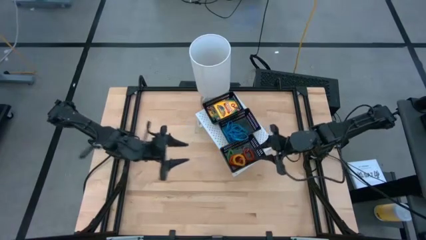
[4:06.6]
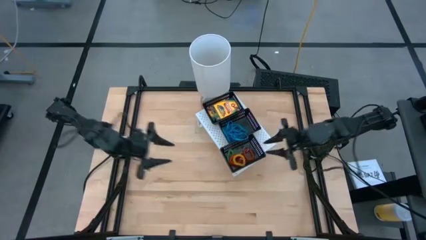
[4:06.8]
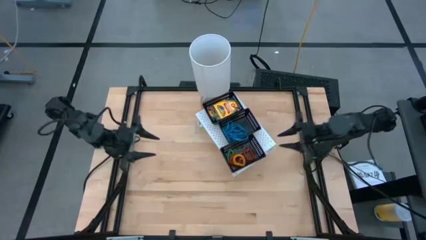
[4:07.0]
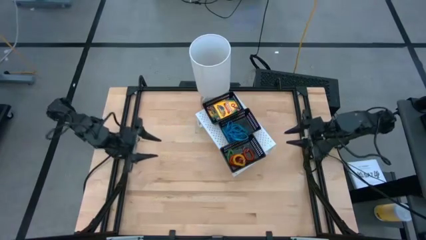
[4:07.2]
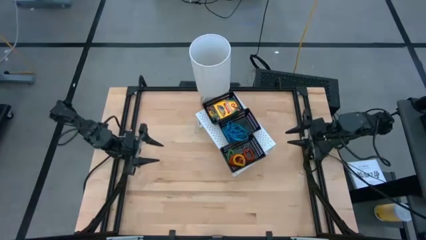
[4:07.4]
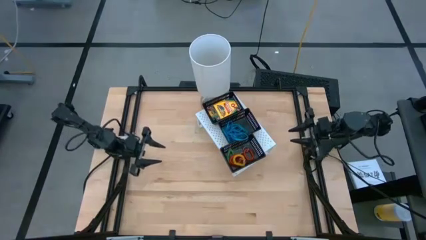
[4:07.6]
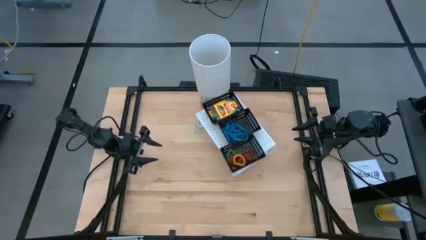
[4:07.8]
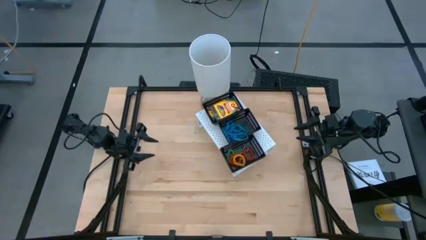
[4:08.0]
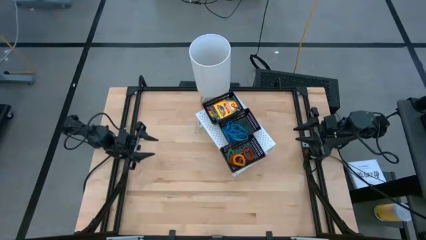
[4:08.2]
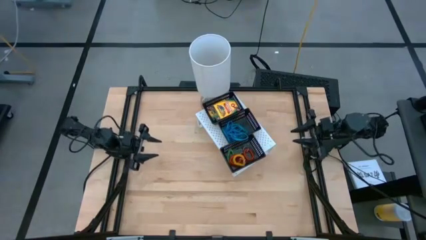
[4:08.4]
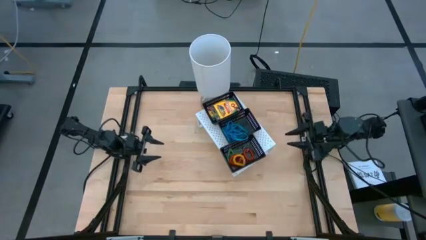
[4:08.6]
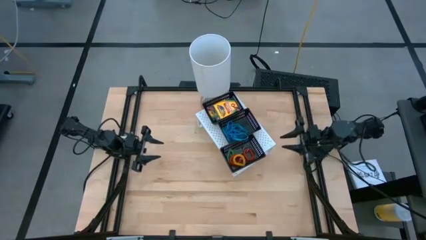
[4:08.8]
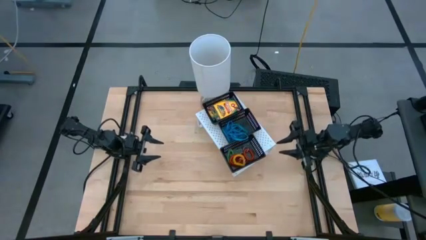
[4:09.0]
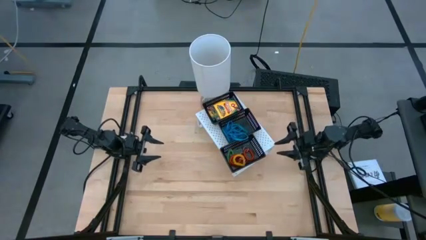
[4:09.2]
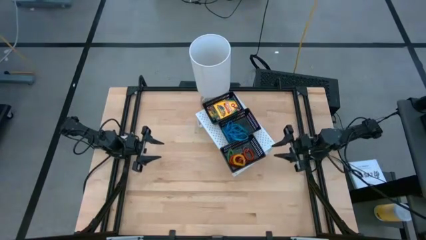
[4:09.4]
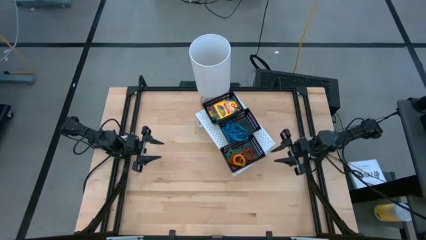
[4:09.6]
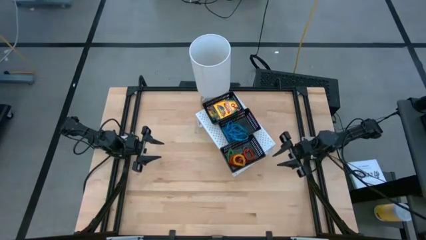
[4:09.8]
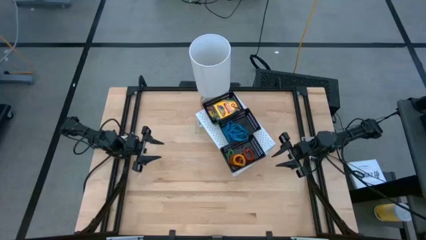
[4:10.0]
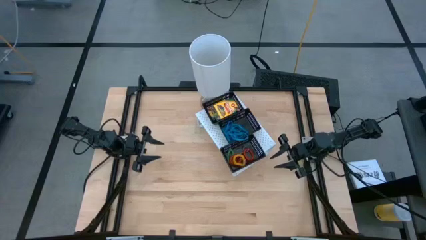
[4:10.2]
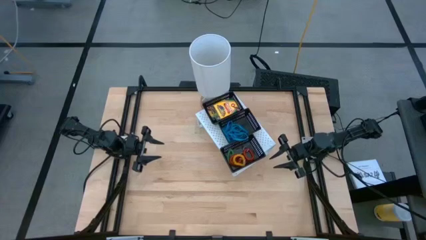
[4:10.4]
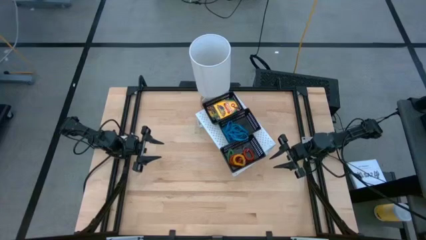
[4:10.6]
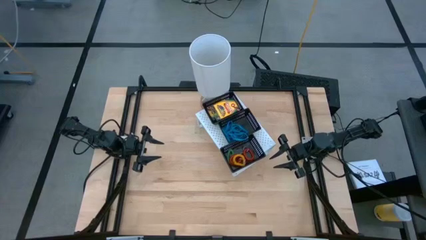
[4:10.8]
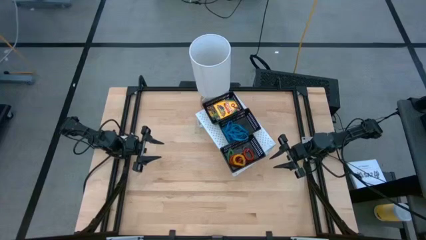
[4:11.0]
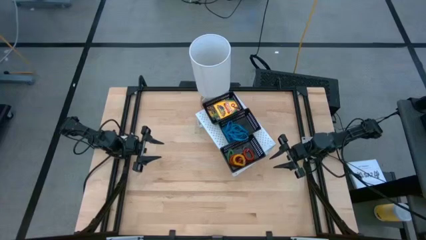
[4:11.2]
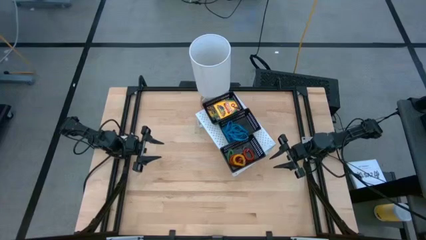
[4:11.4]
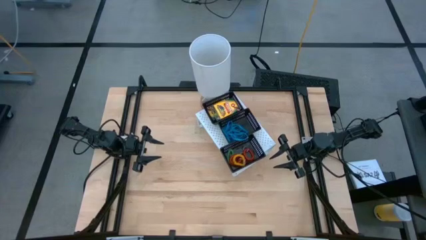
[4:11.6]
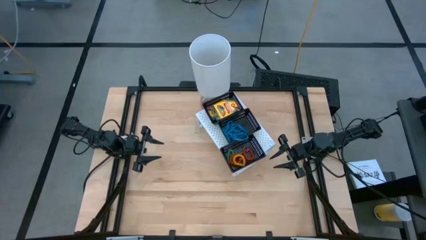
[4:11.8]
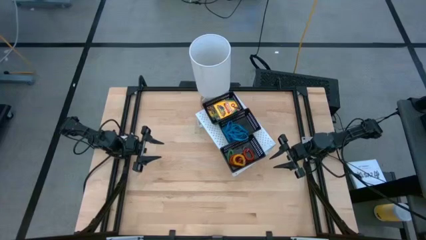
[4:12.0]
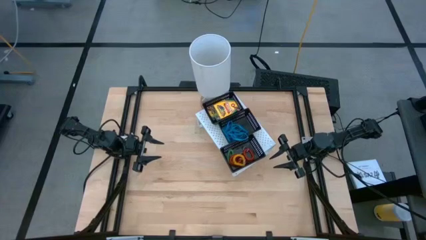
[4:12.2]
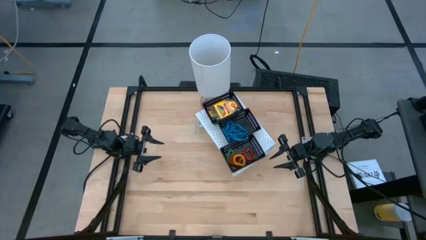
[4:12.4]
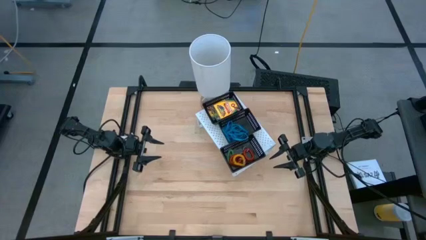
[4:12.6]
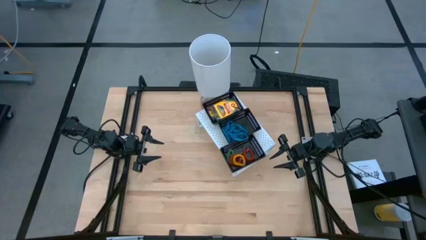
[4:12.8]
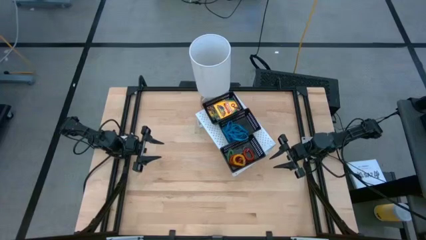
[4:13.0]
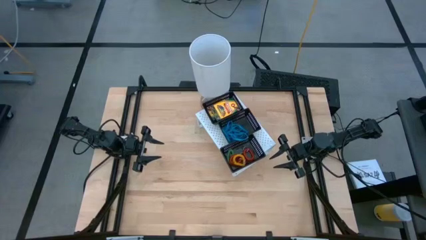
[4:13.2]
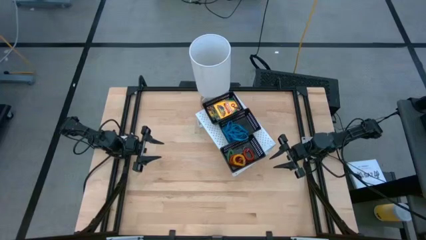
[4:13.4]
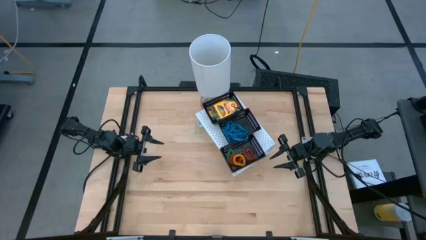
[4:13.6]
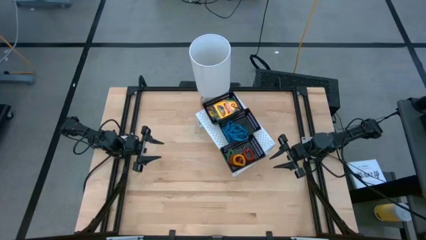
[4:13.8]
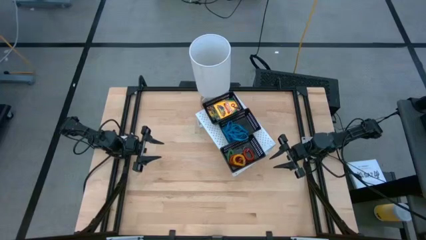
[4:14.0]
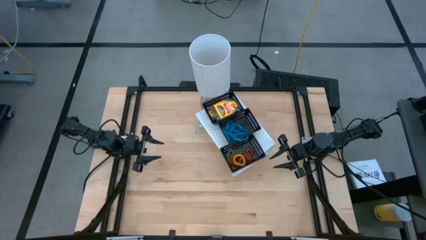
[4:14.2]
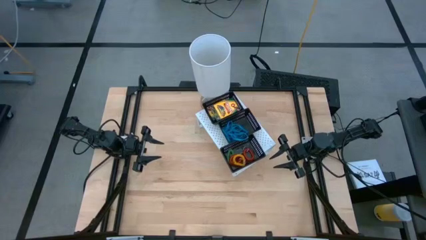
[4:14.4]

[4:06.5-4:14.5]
Task: Pick & Place Office Desk Supplies
Return to Home Position
